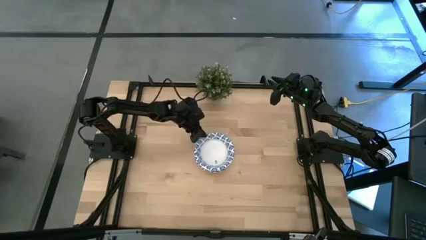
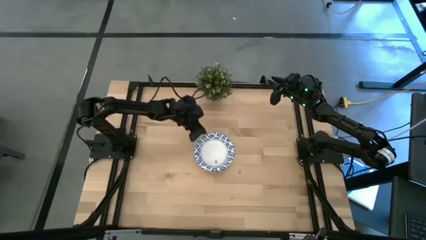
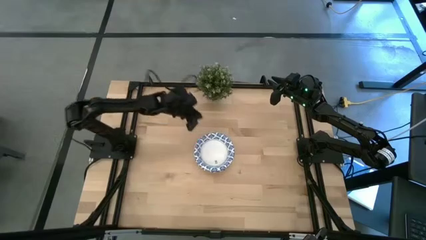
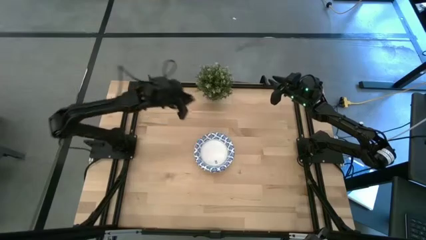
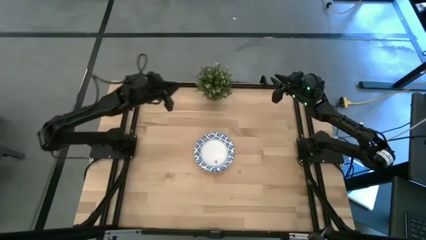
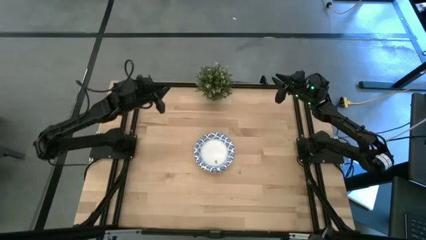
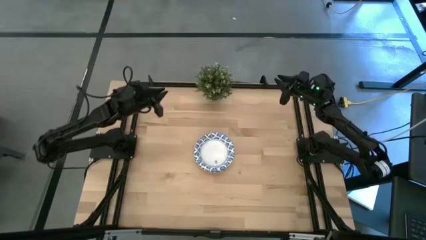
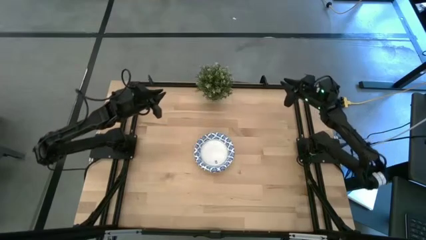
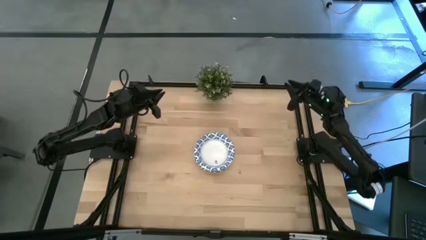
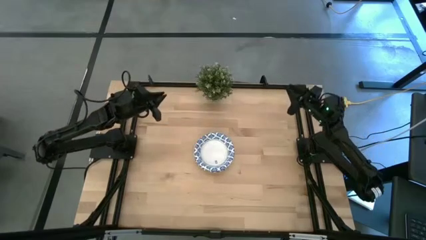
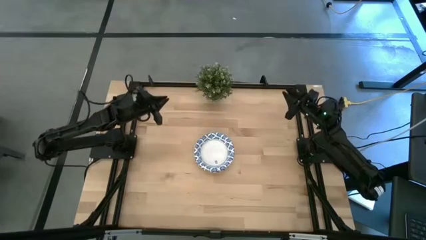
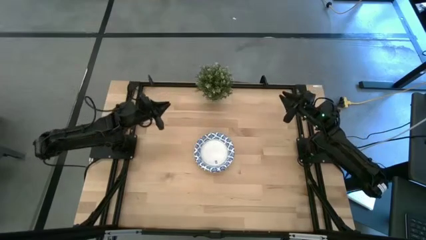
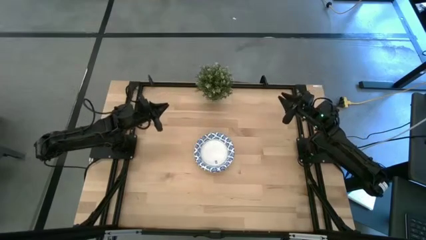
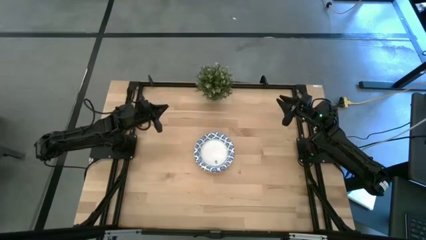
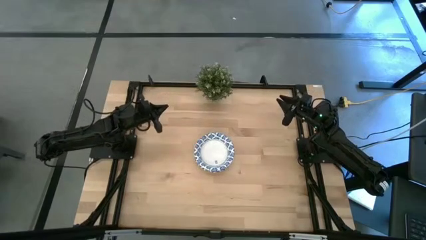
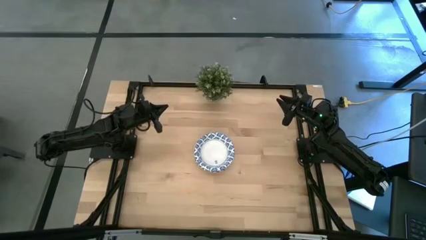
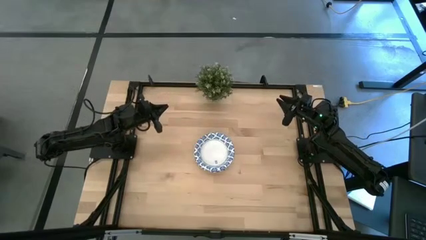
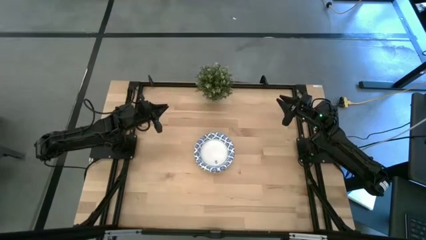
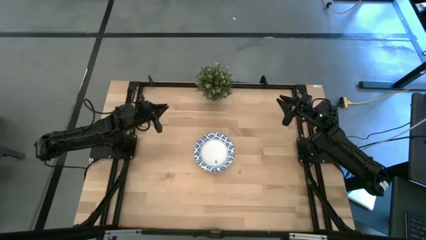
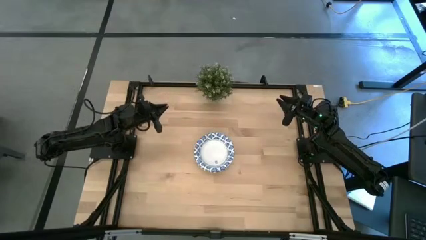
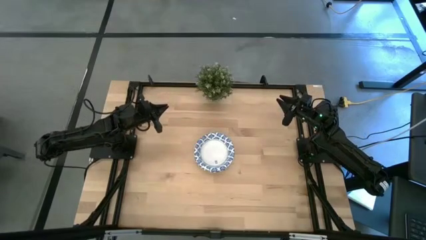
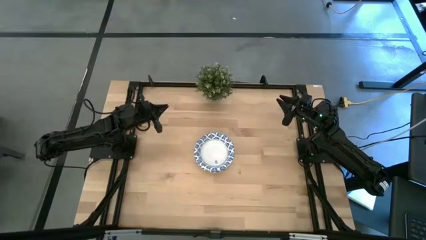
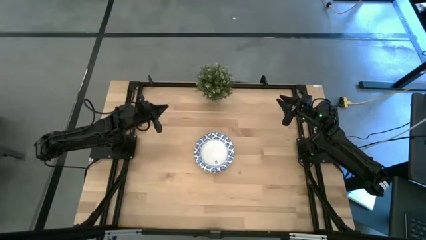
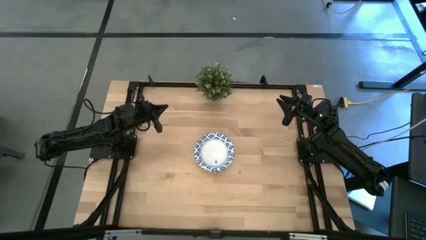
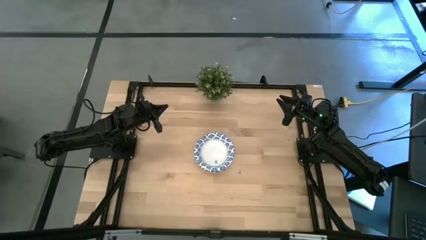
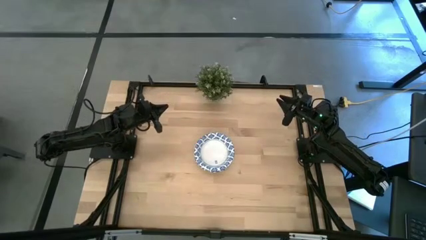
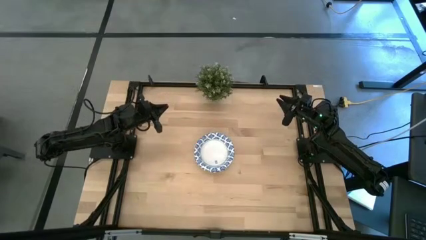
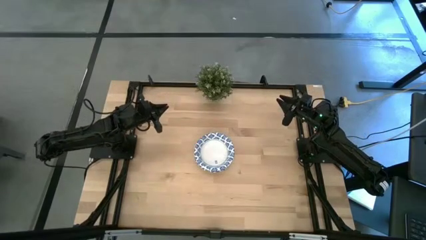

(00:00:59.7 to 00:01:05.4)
Task: Nest bowls inside each other
Return to Home Position

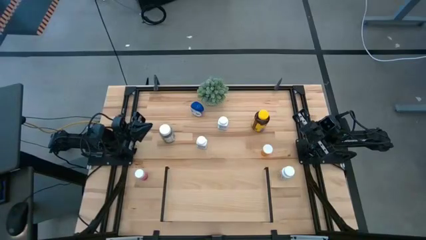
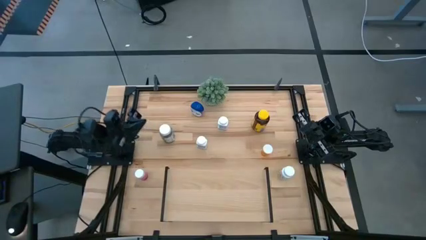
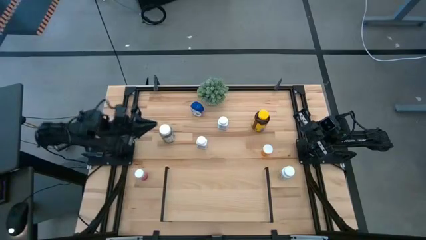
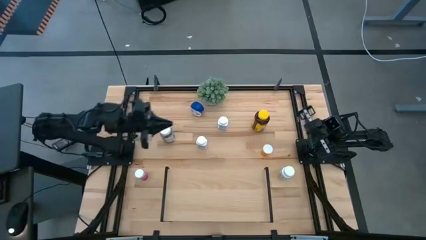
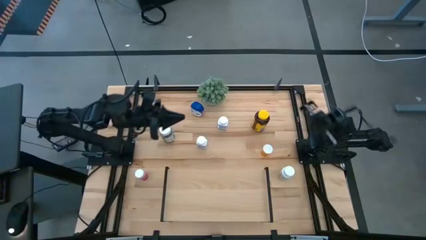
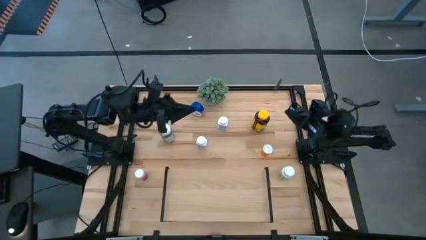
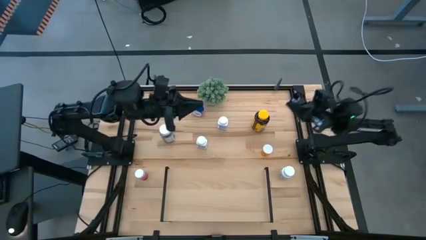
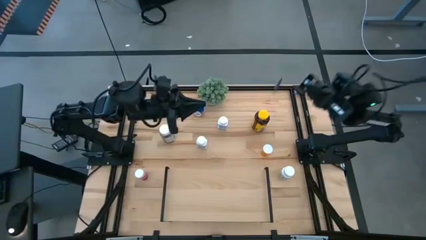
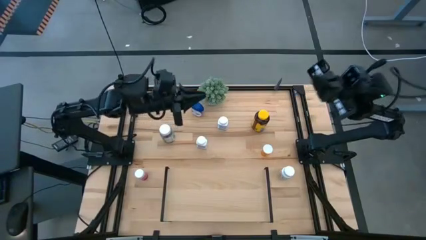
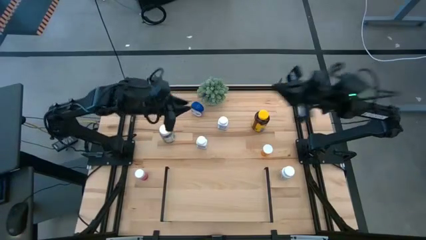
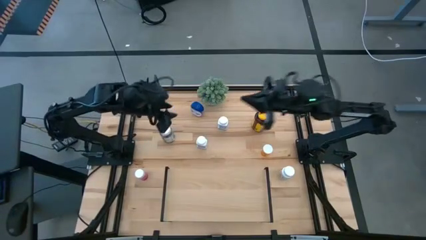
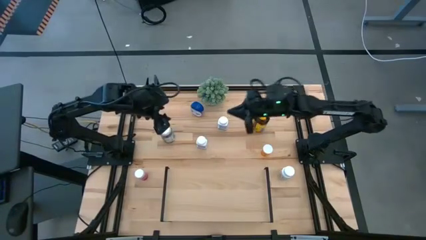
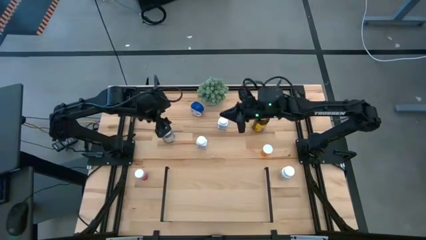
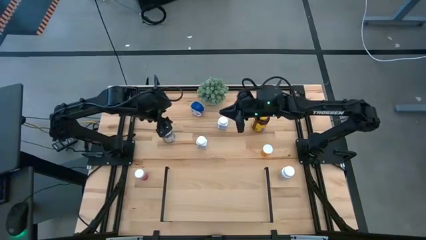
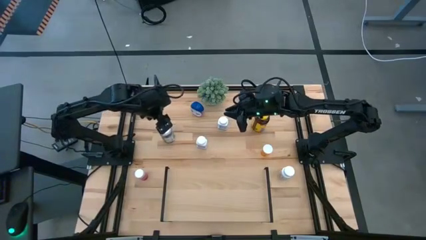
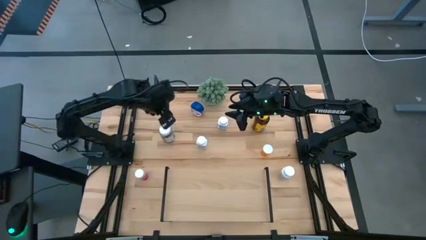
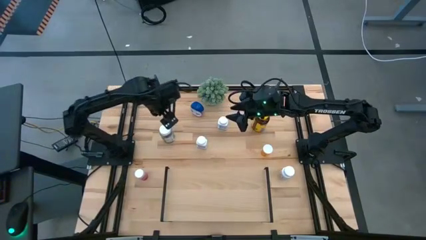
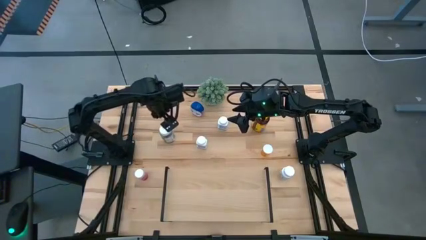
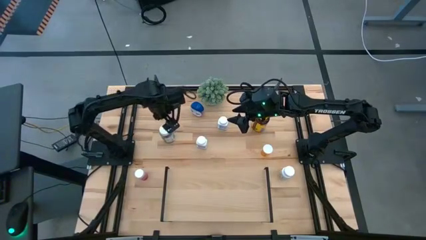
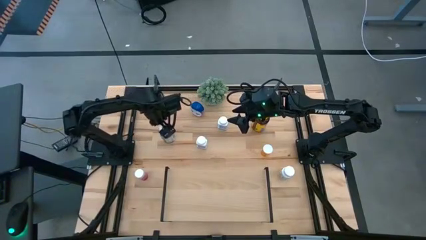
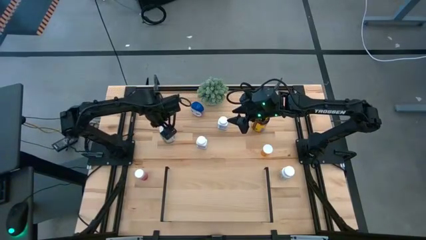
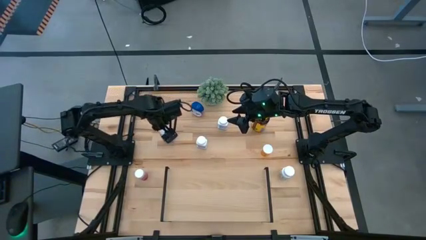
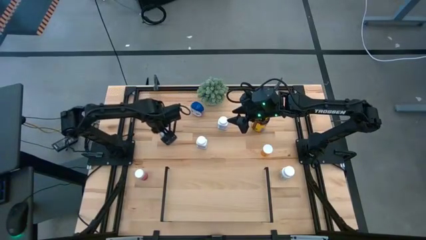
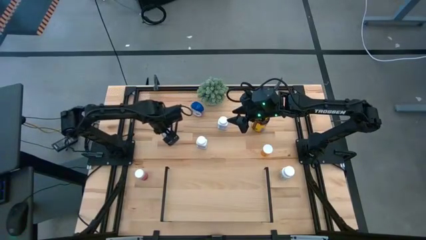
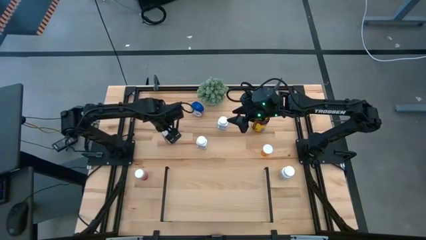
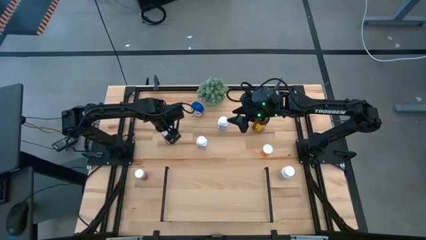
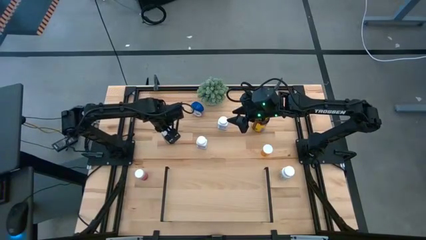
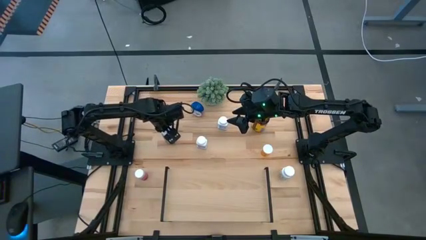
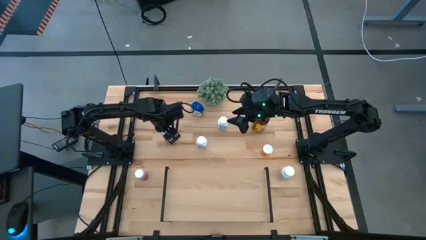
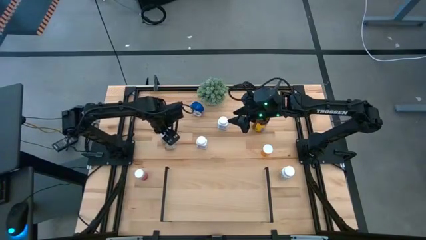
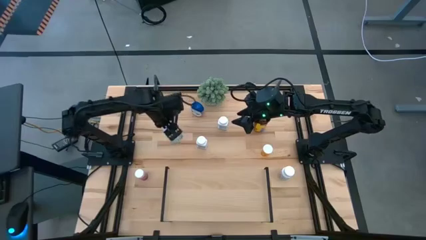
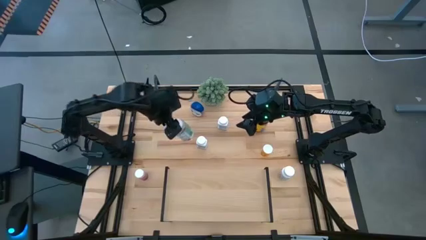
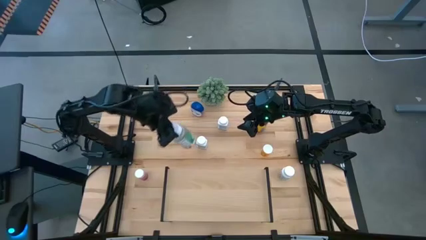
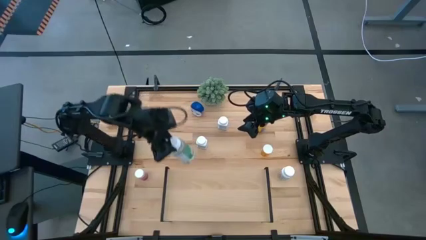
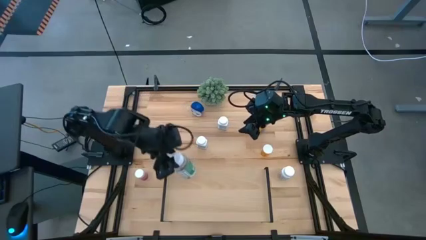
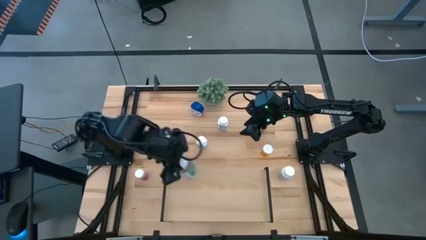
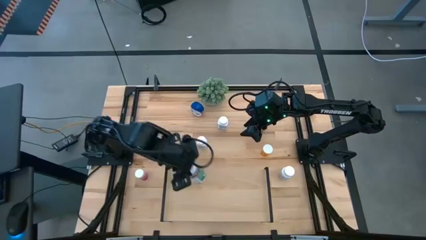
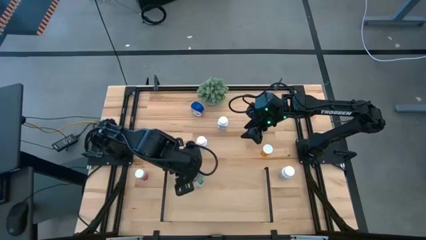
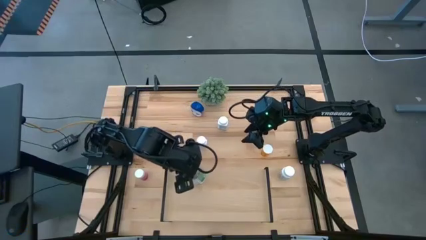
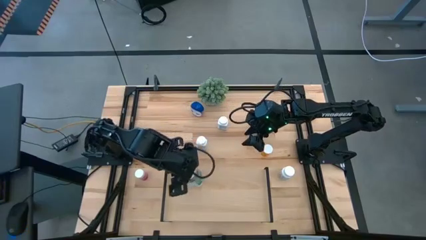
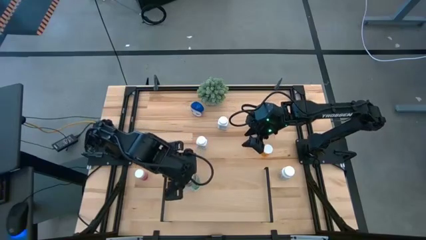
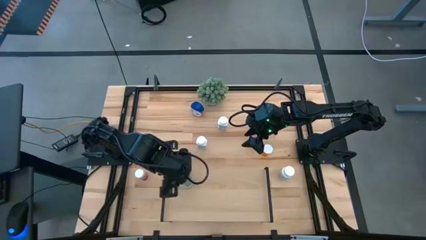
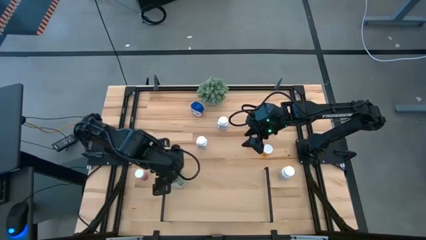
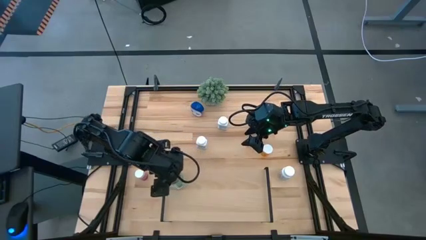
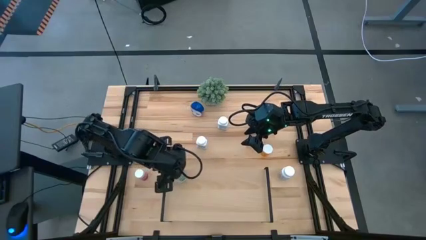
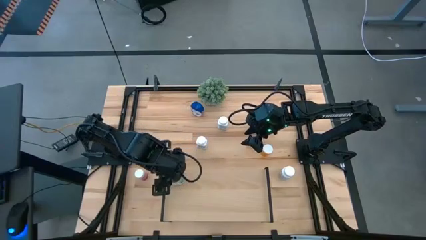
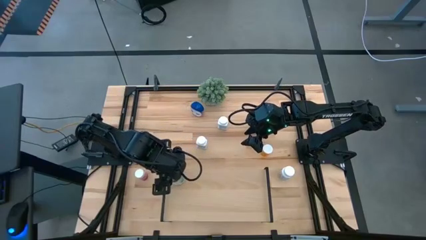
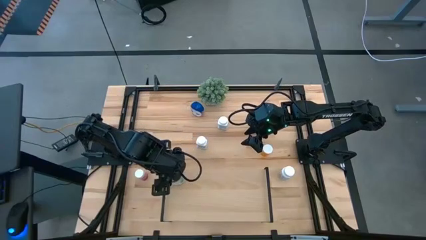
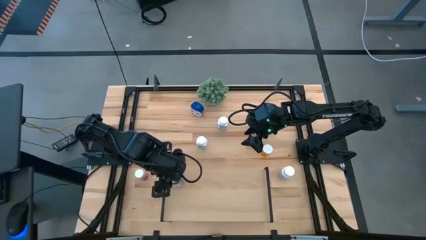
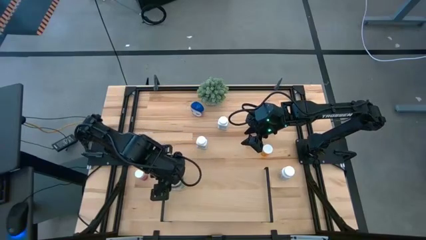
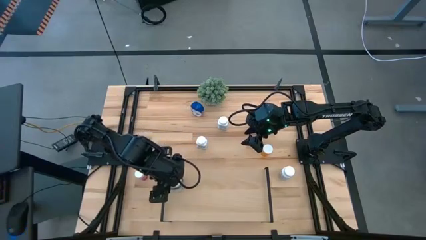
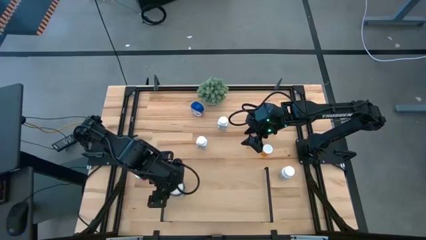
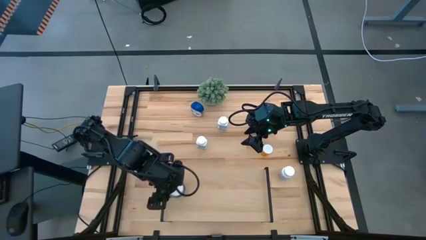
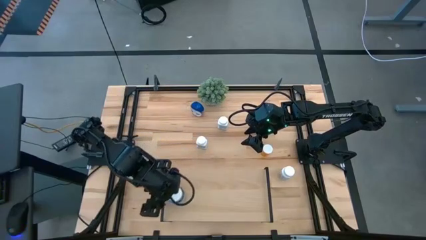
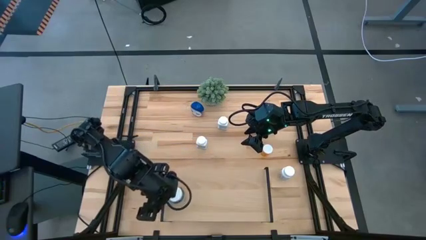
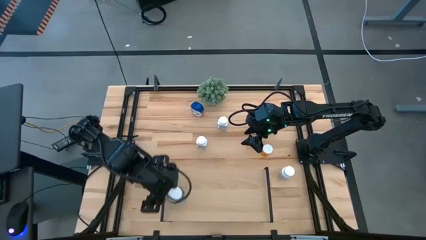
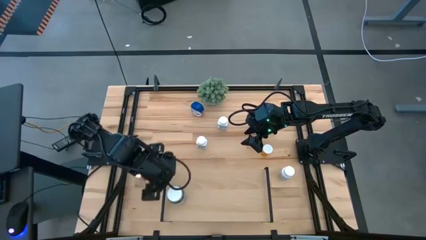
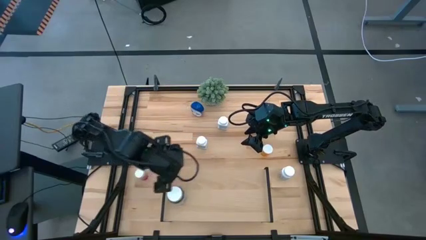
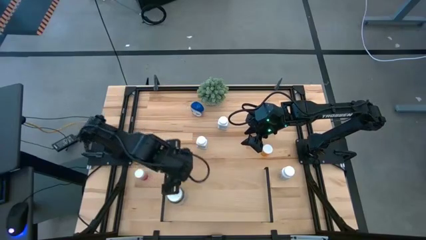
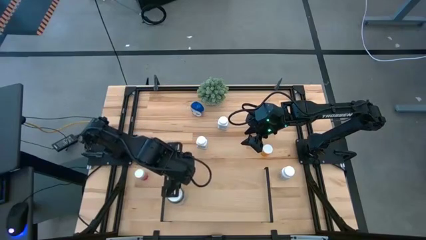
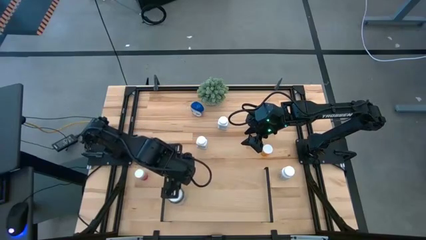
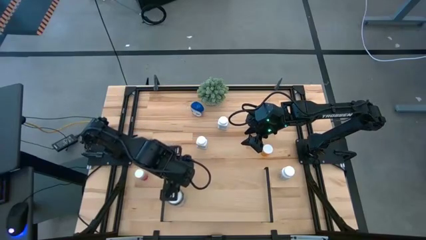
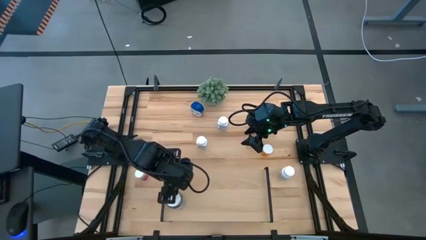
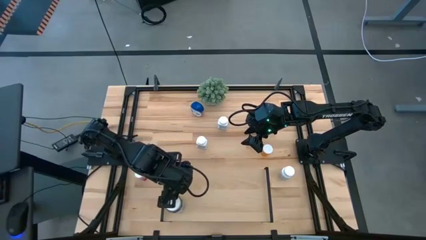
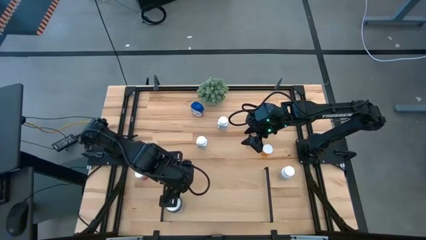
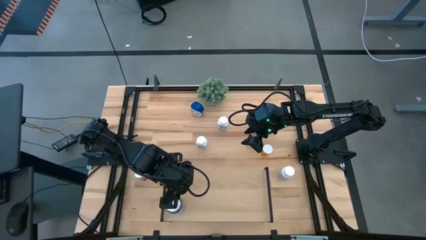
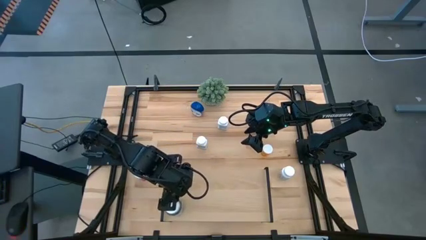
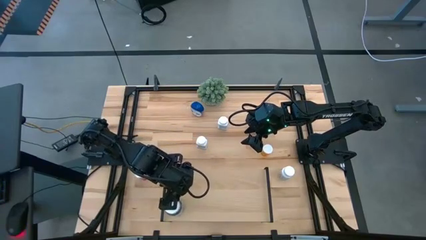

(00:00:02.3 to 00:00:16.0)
Task: Pick and place medicine bottles onto shelf by color
Put the green pill bottle on the shelf
